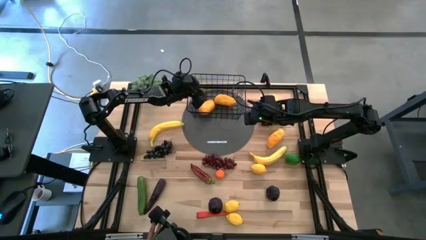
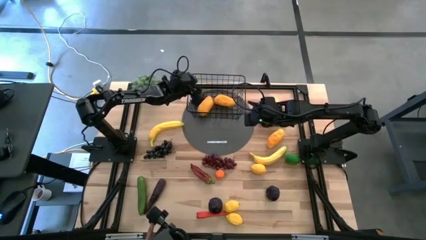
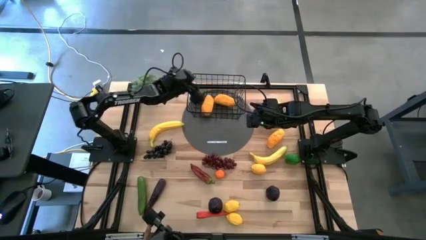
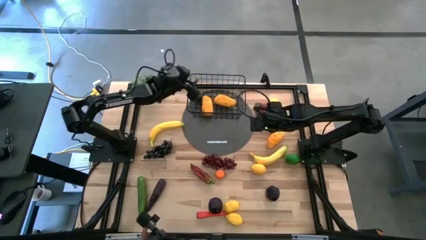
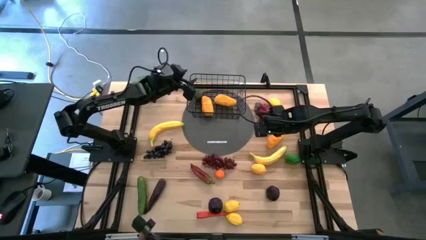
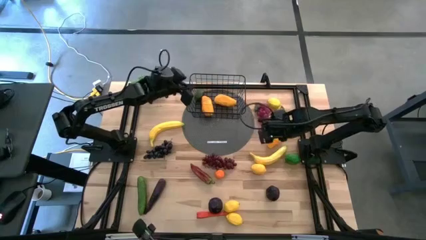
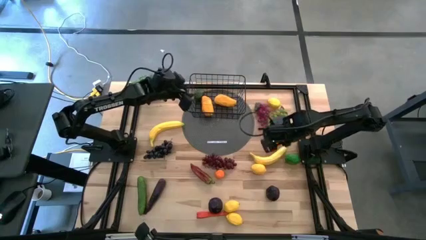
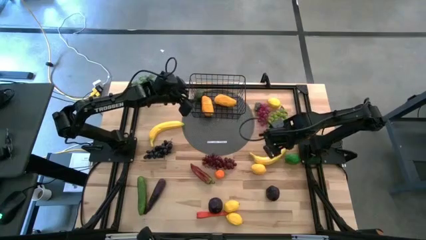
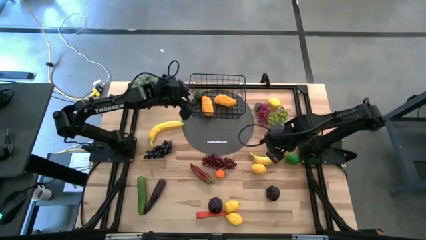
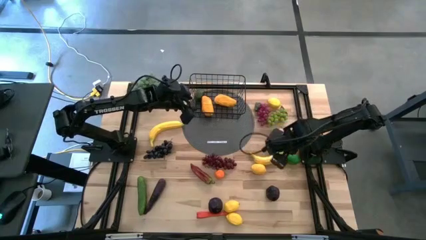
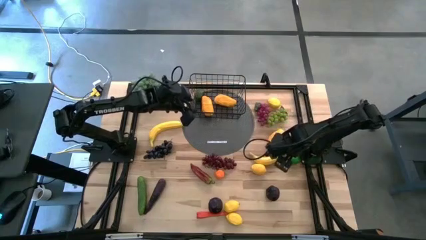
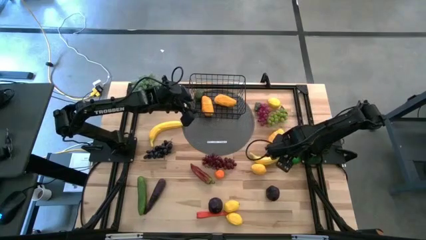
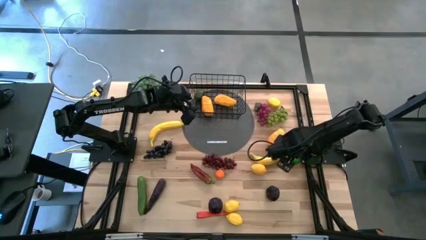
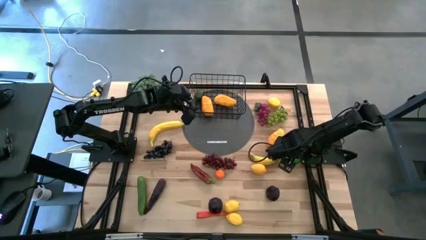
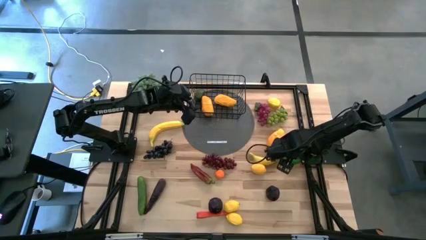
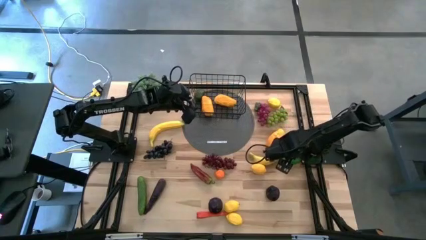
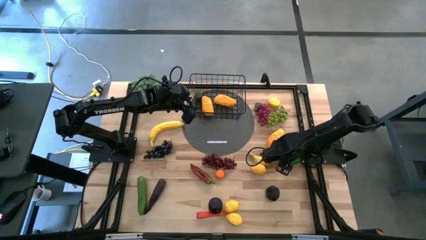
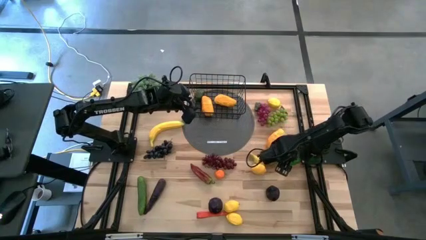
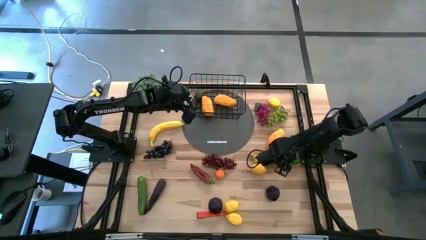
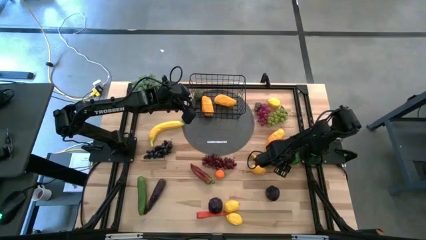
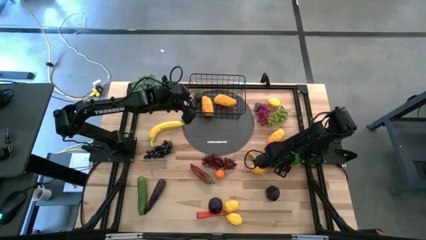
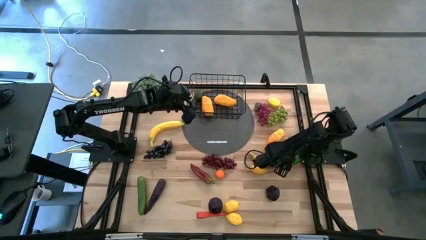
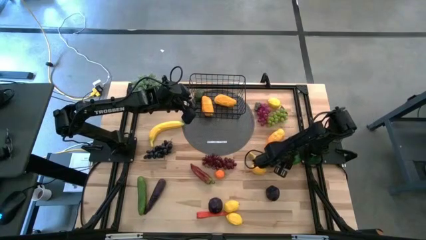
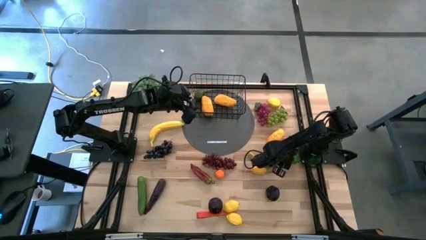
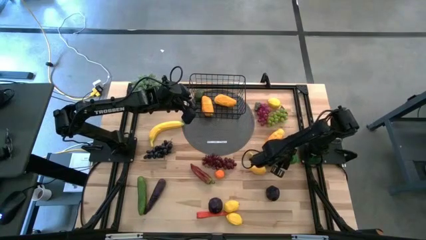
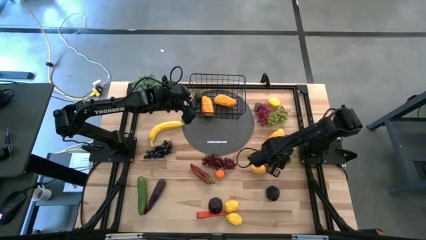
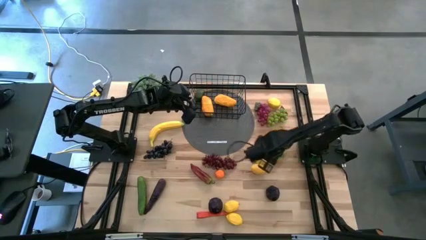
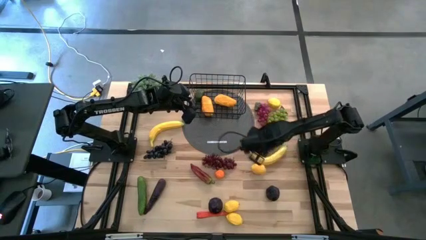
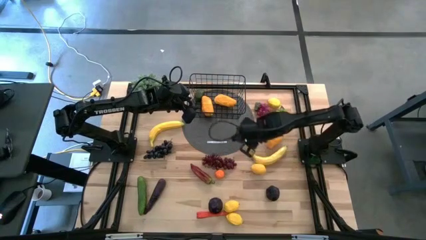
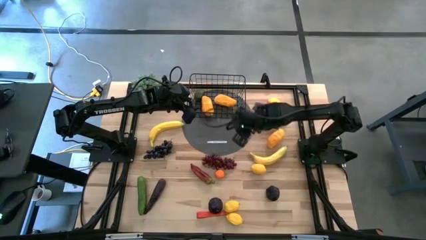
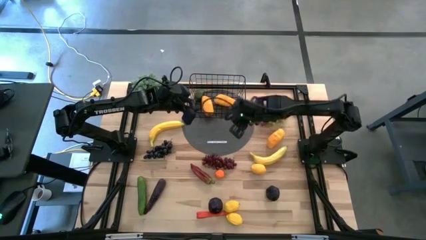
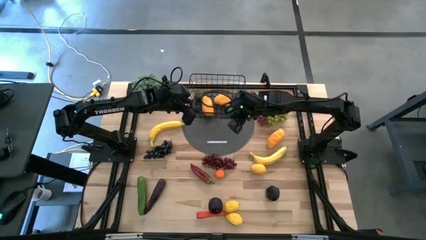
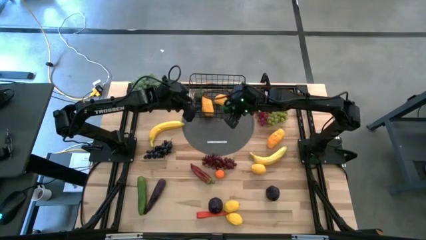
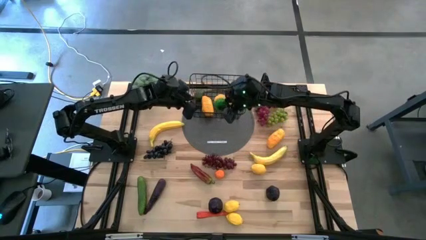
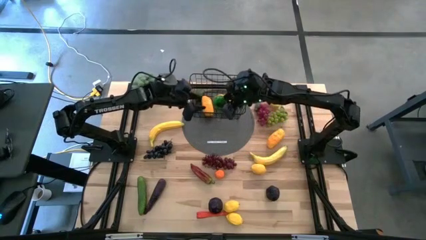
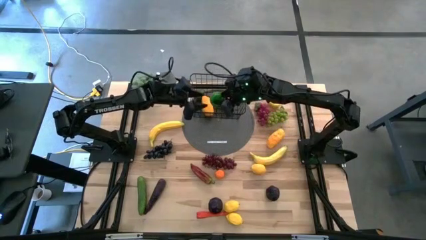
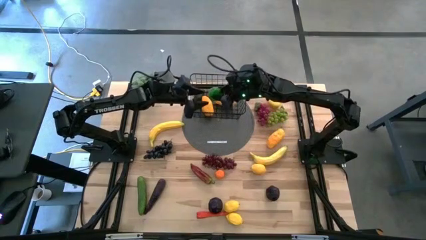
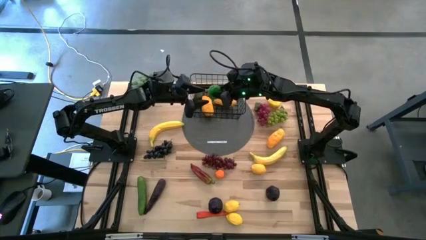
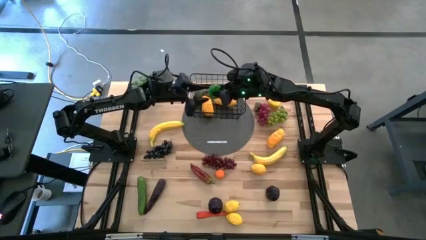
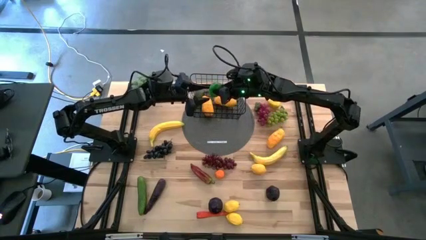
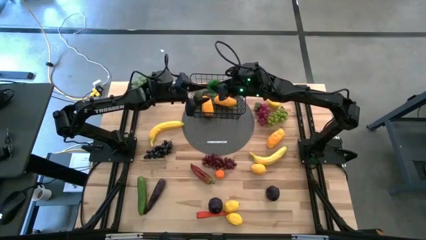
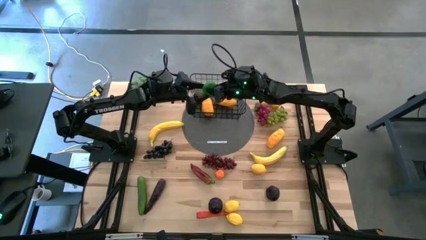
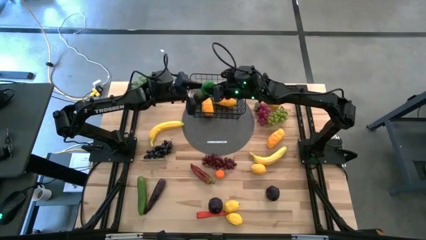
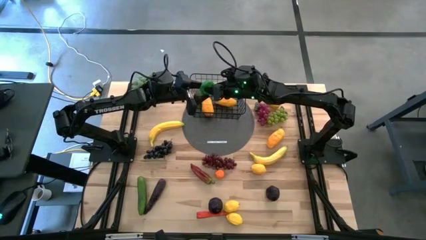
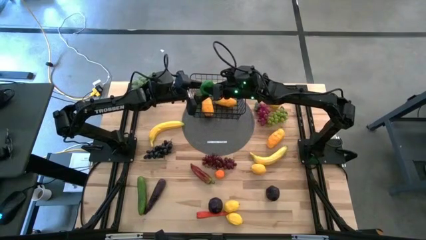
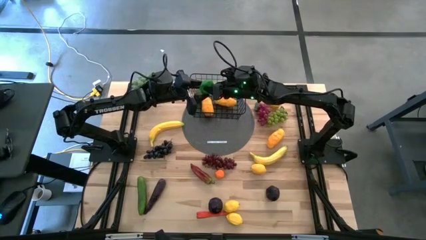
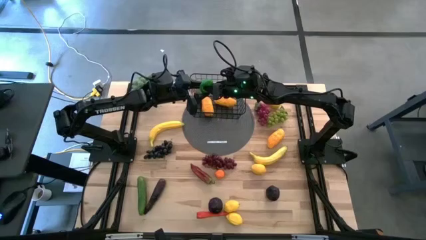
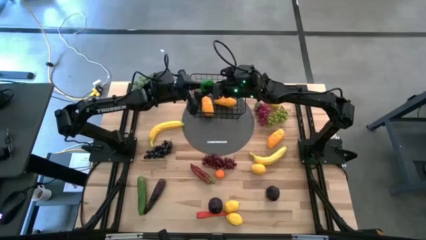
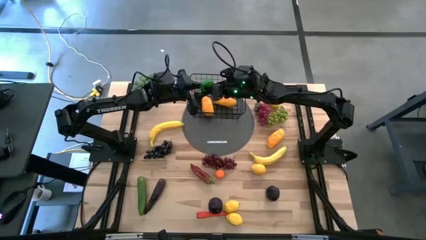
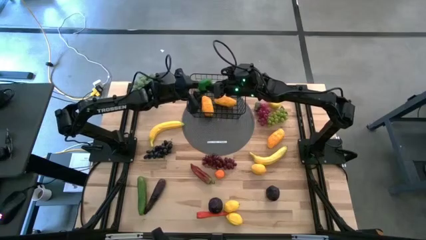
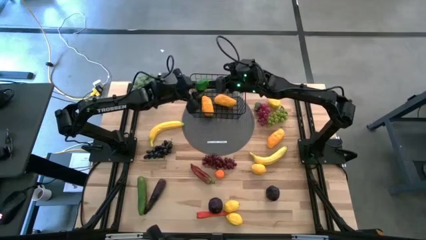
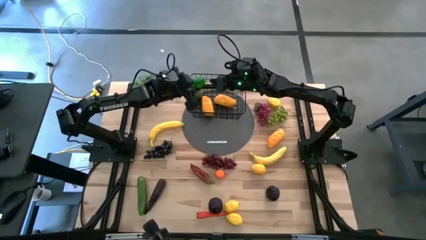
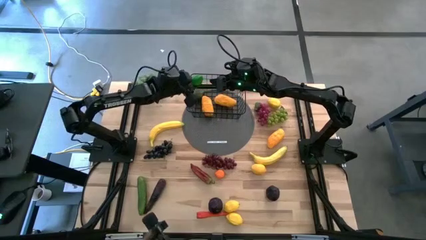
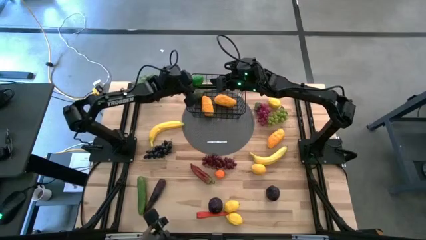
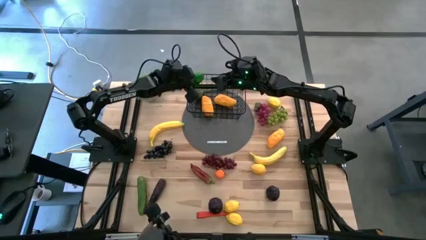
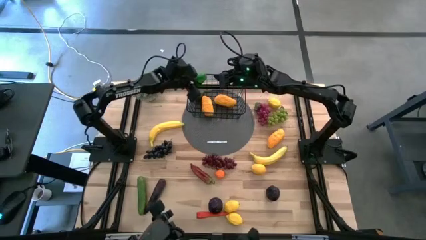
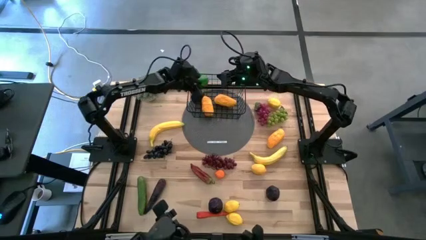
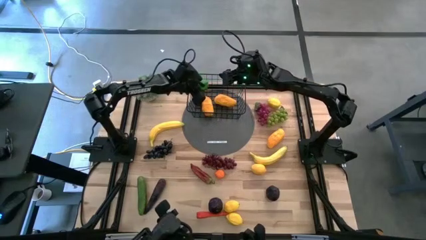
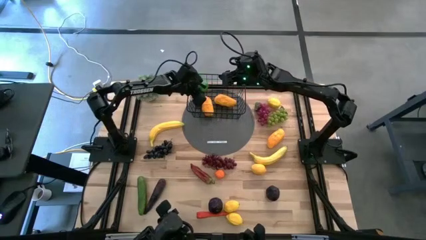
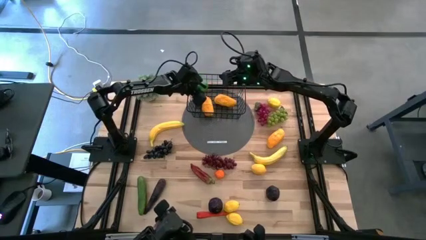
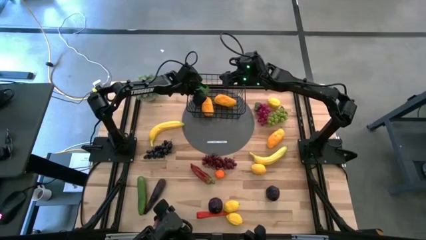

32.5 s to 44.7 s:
Task: Build produce basket
Put the green lime into the black wire basket
